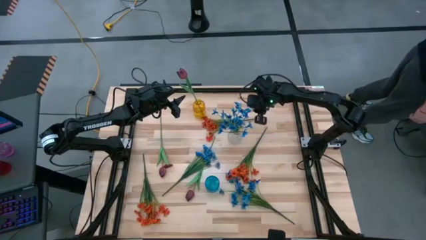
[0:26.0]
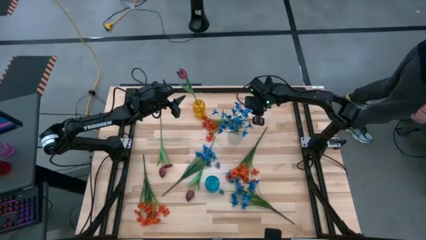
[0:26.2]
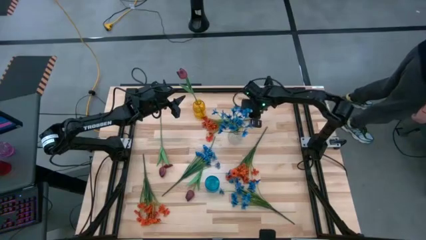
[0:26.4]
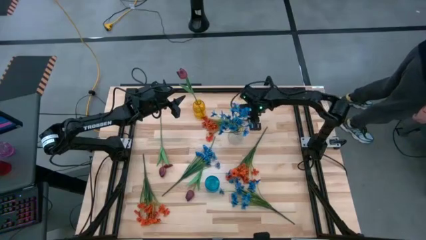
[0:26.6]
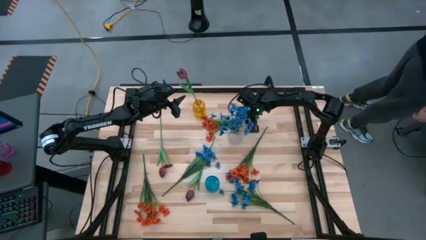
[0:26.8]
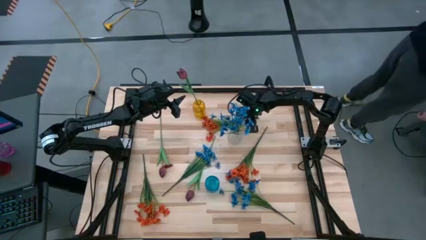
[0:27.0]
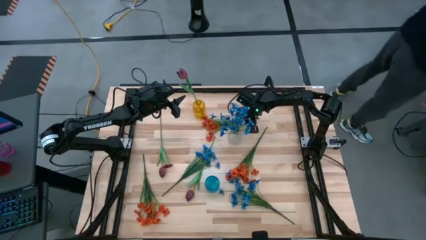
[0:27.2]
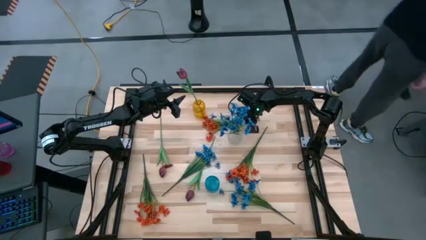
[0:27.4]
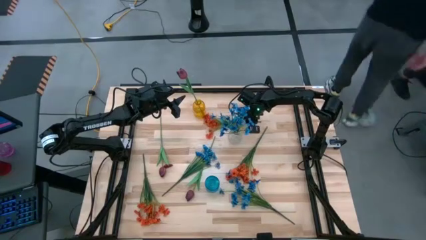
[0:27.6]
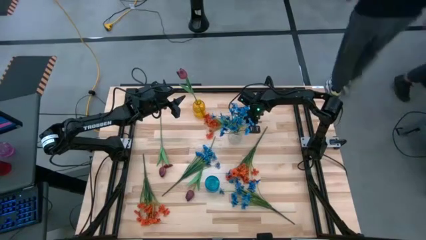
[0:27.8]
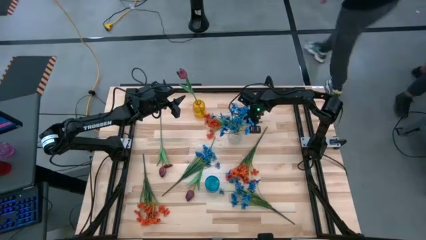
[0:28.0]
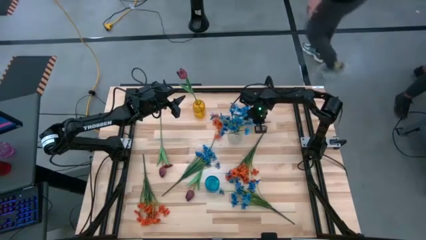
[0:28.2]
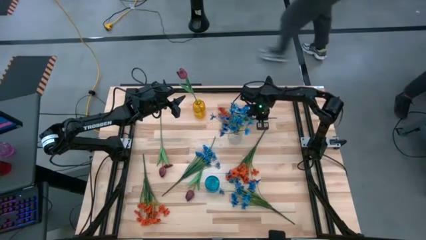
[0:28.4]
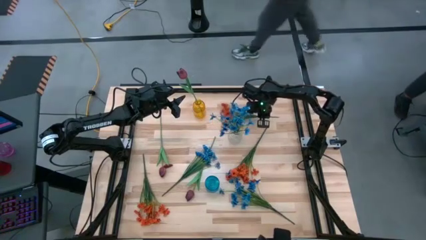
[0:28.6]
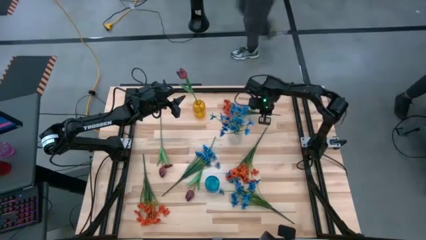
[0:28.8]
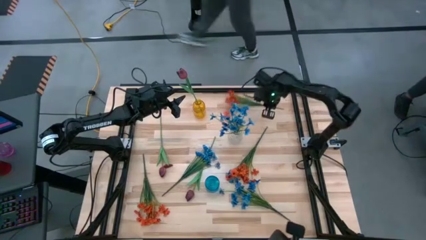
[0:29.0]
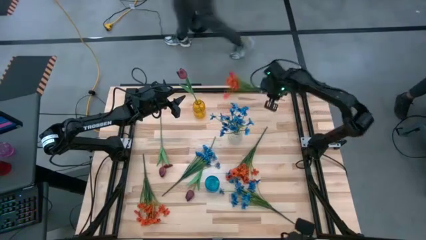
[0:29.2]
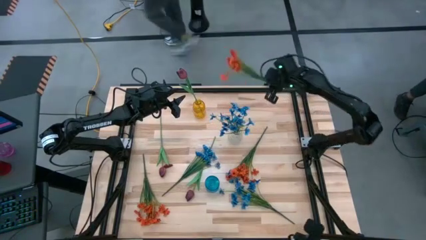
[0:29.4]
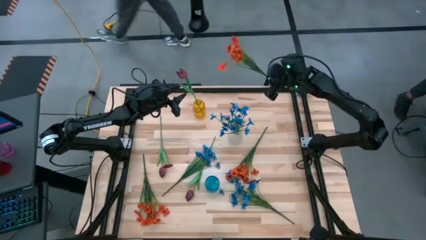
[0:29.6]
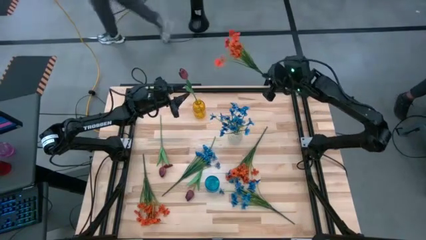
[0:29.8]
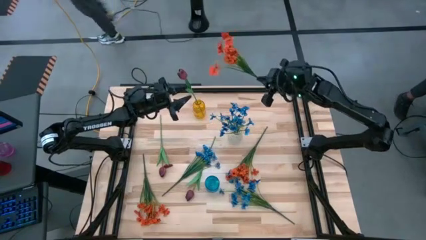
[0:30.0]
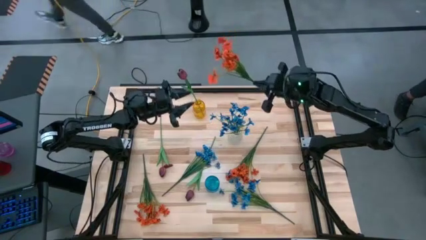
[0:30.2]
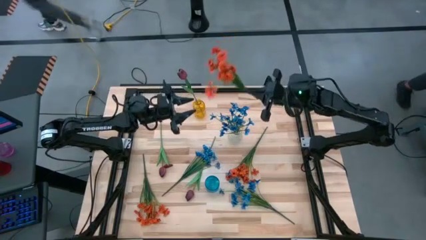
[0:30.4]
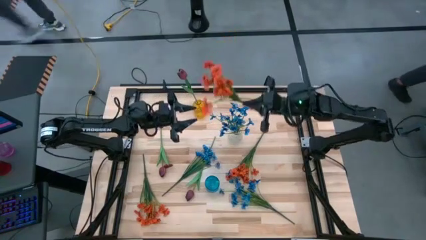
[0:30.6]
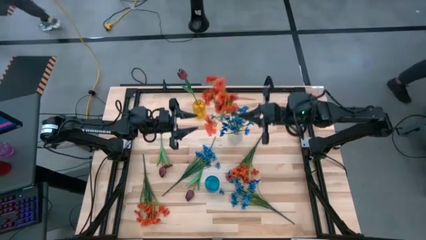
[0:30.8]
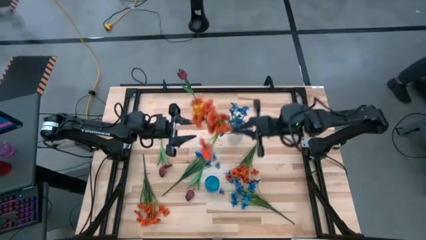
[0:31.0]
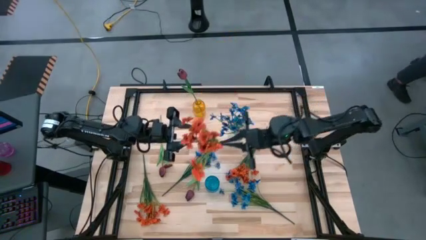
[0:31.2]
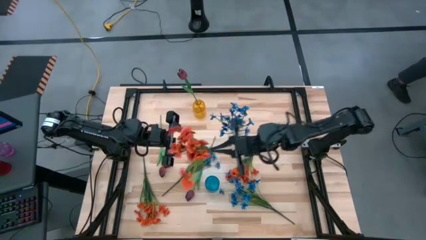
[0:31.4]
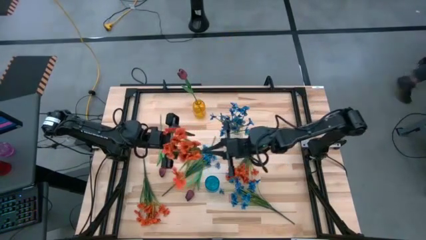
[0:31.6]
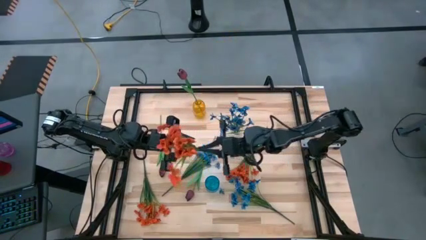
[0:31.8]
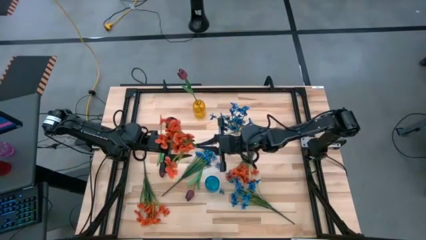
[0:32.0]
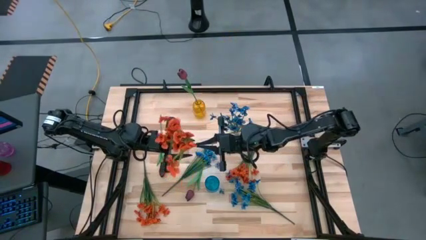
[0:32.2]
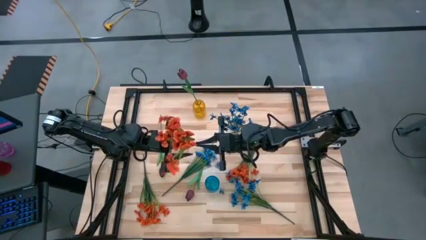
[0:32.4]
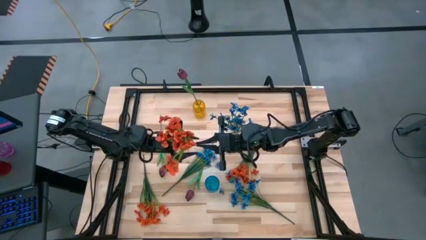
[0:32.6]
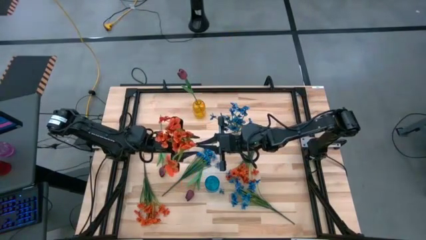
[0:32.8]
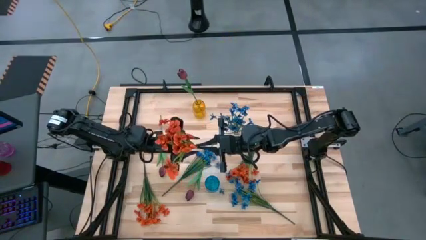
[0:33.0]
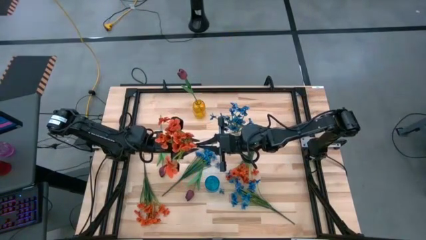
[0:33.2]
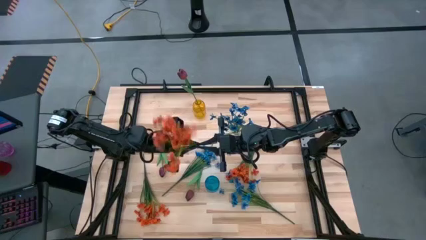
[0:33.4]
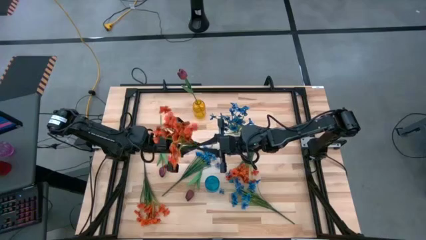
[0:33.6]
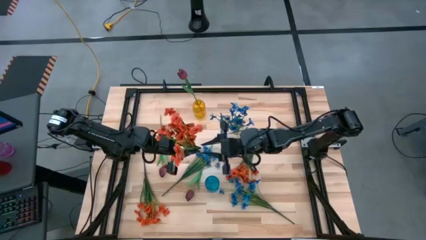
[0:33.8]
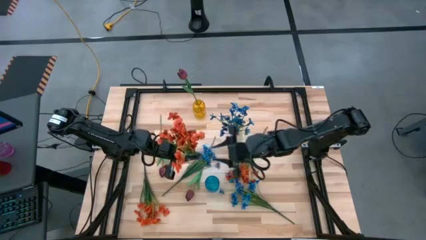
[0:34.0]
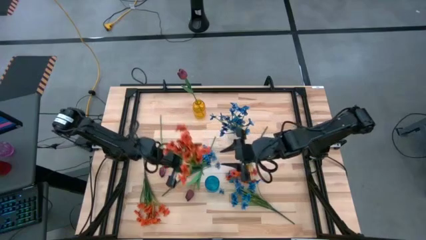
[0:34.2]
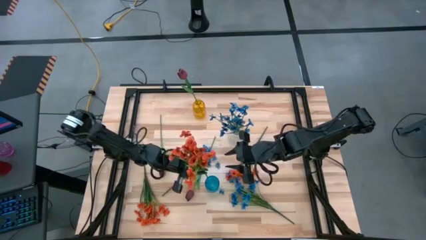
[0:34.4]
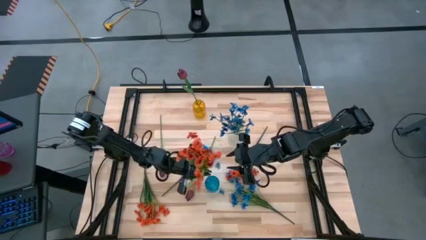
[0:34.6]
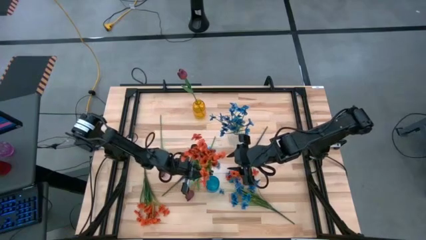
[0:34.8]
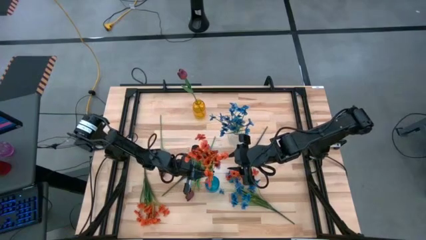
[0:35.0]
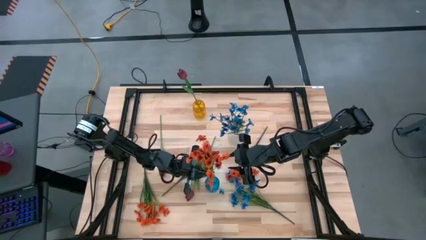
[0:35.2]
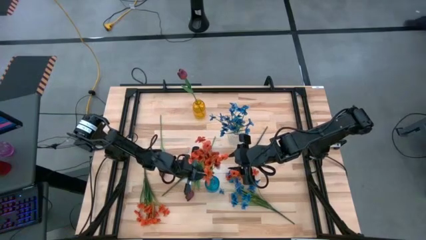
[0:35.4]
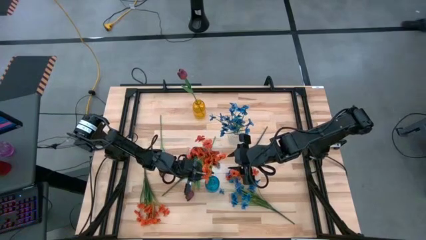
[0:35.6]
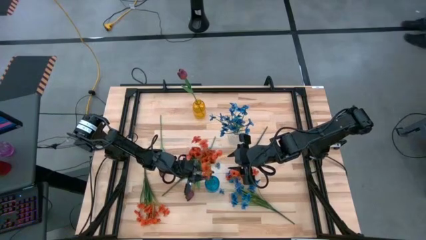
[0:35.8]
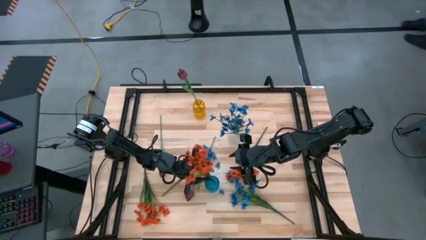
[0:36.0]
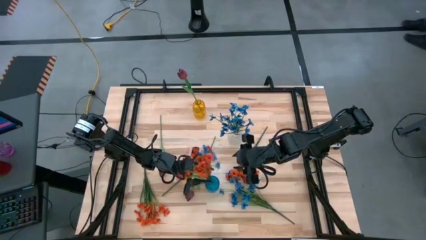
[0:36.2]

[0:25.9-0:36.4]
Task: Sort flowers into vase by color
Put the top orange flowers into the blue vase

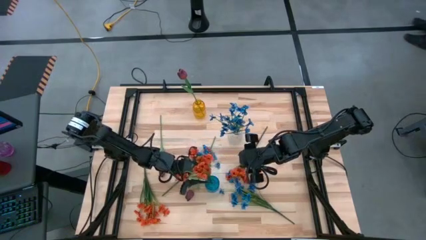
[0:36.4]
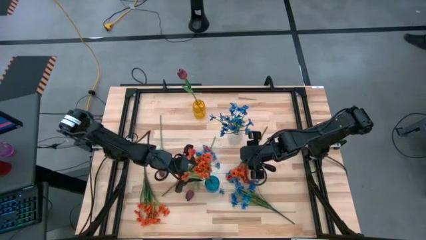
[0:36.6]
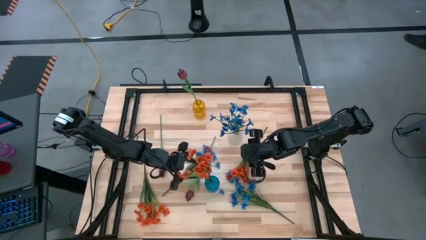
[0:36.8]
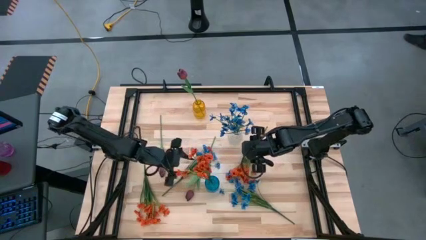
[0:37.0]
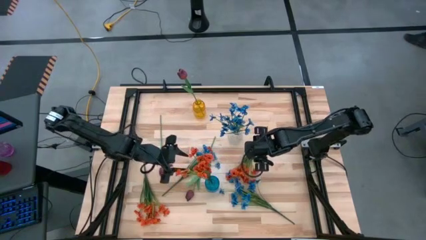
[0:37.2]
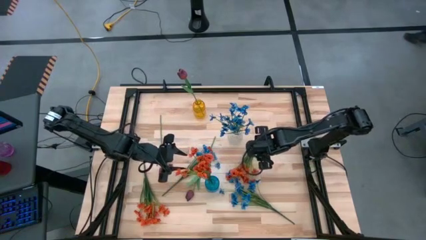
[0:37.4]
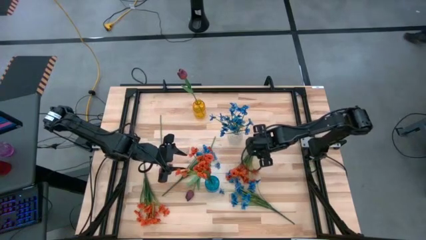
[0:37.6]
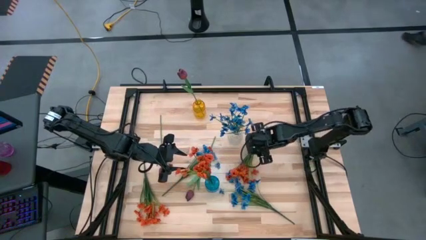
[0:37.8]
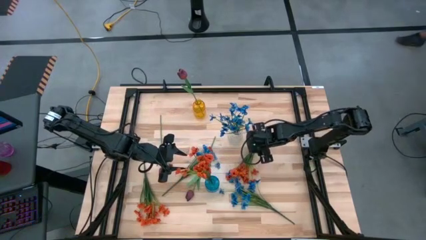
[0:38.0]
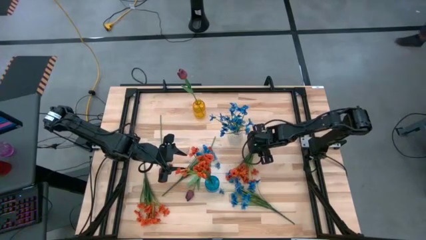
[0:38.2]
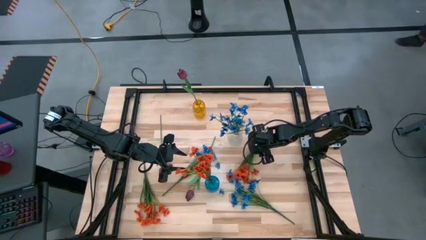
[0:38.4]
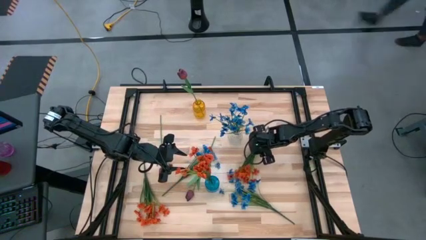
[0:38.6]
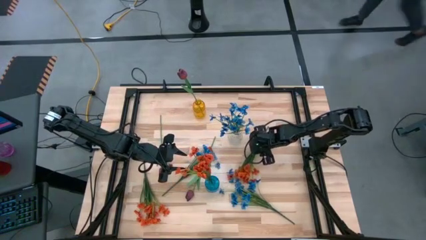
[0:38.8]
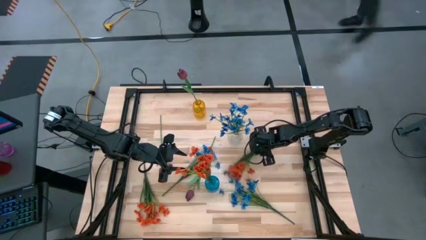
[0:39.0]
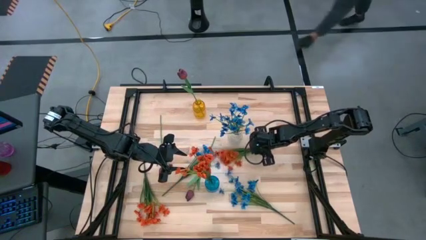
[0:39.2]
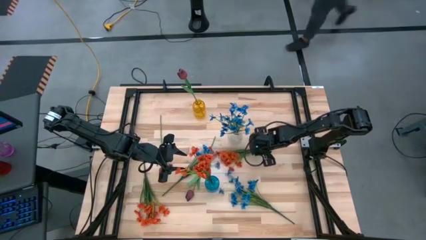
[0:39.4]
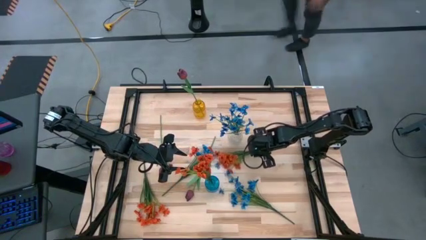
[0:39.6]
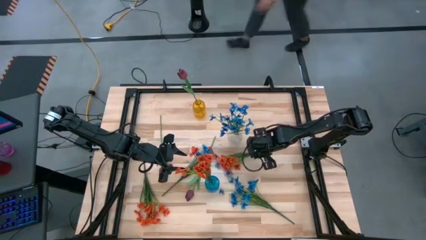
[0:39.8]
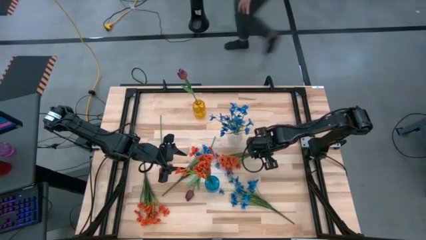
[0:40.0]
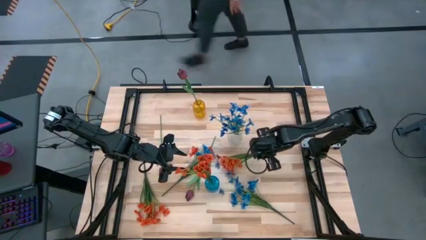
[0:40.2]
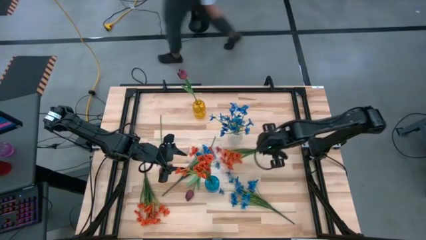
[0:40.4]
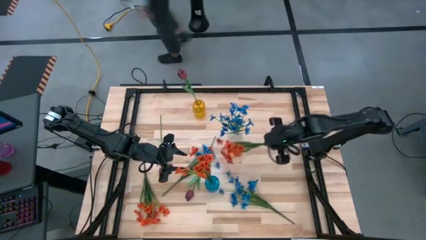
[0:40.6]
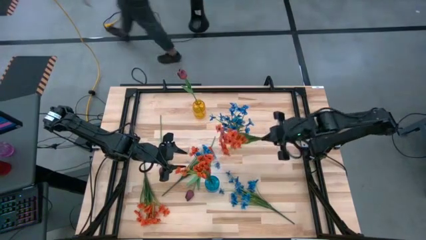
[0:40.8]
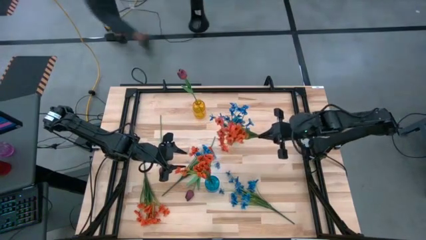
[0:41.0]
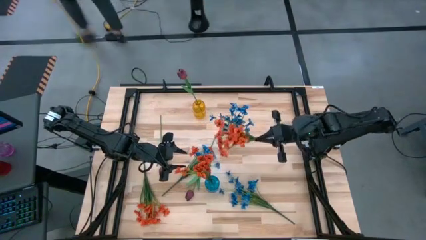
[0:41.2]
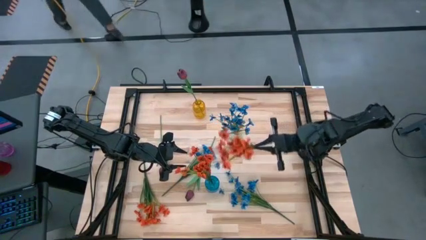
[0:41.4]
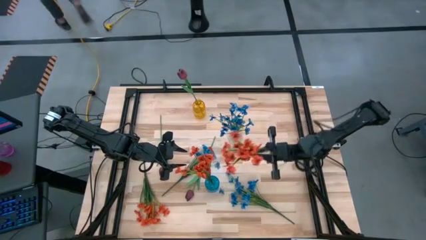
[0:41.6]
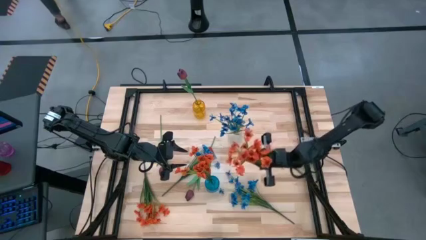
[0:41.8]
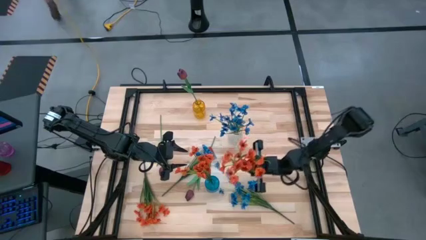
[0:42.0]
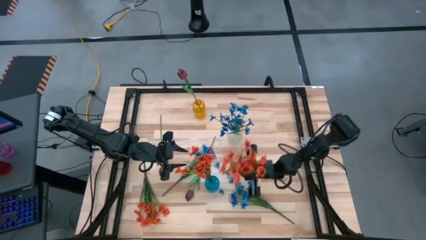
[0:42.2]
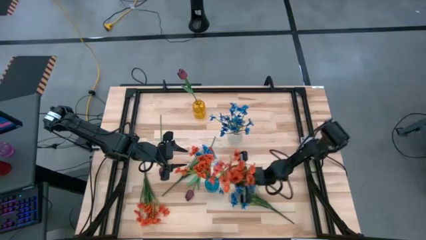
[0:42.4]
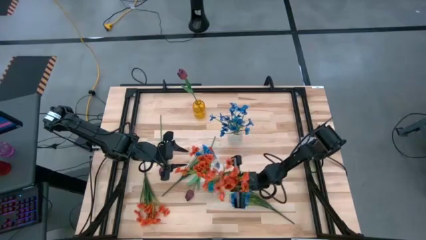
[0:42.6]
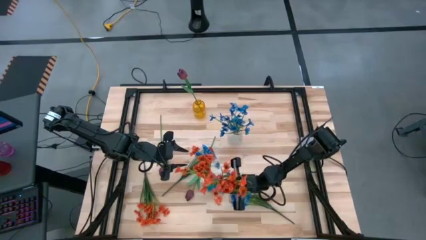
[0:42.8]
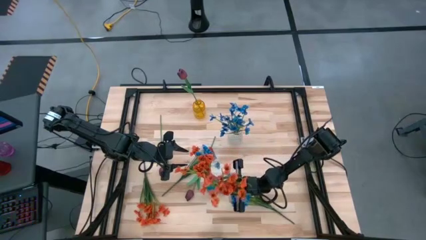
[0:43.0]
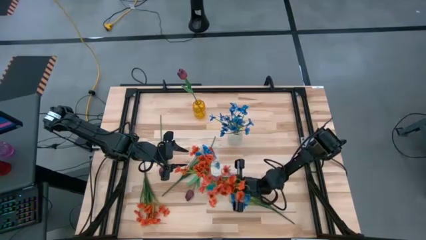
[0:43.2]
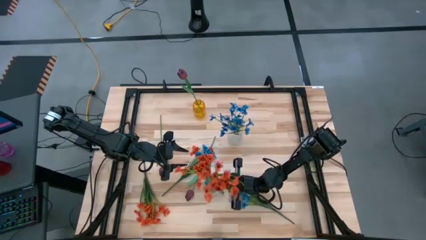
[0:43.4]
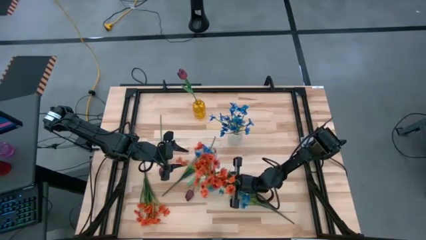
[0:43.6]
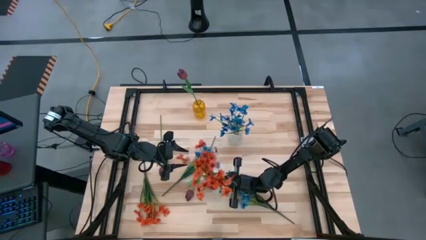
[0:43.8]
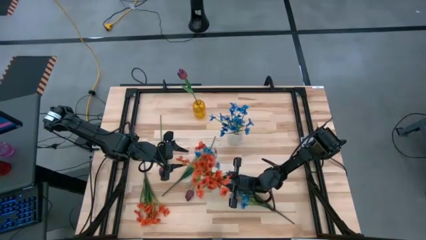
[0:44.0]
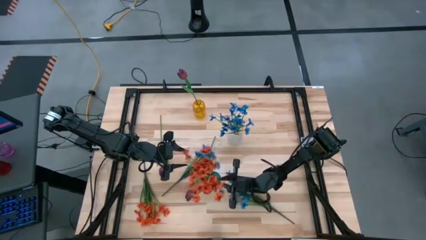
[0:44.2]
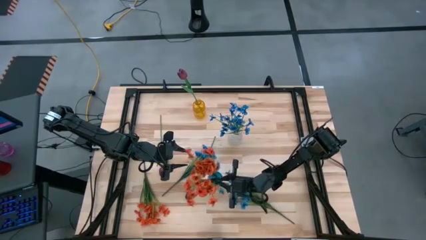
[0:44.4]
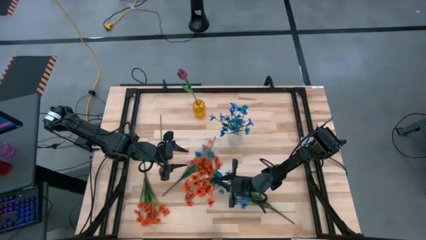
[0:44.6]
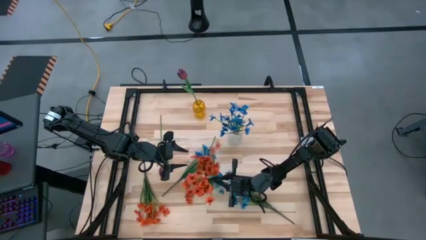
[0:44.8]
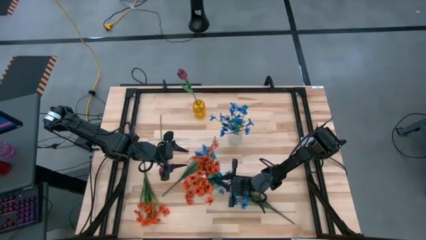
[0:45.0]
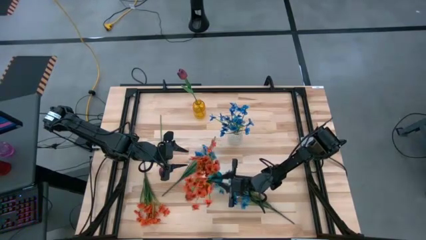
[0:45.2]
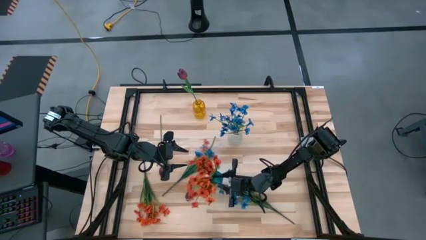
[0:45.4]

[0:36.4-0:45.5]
Put the right orange flowers into the blue vase
